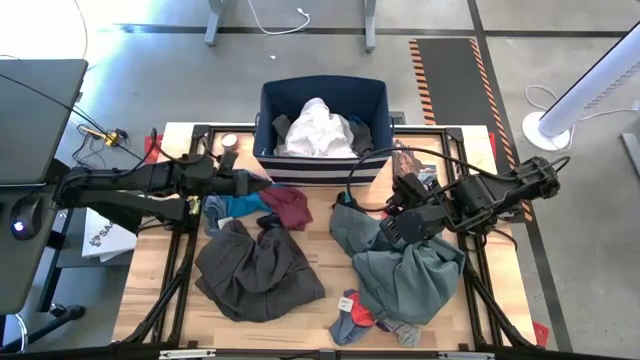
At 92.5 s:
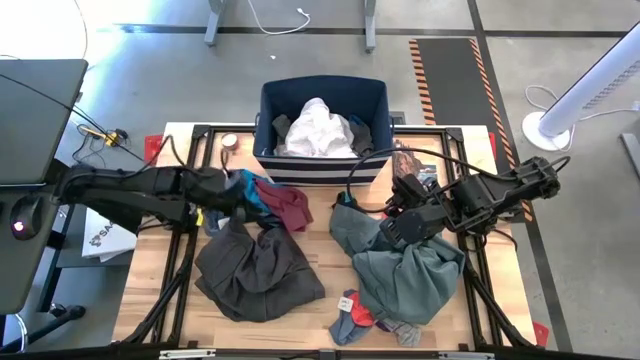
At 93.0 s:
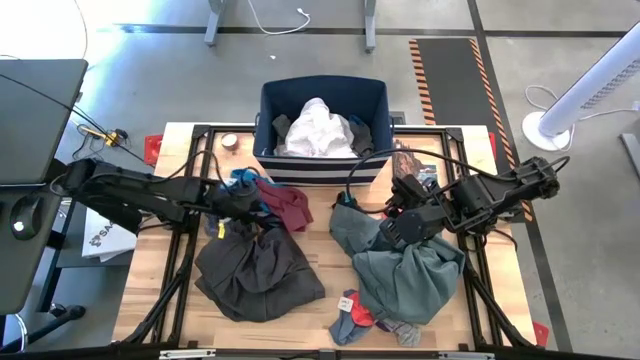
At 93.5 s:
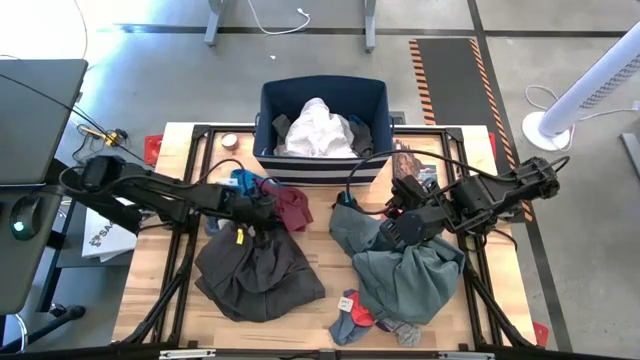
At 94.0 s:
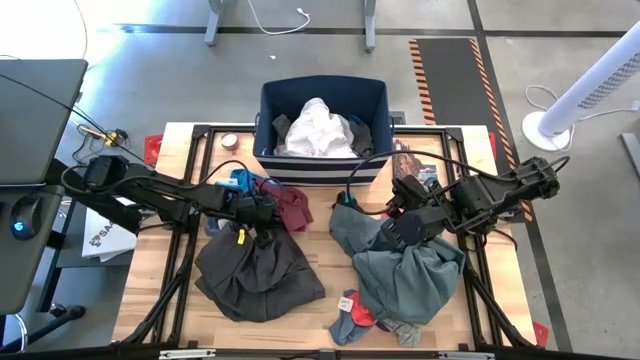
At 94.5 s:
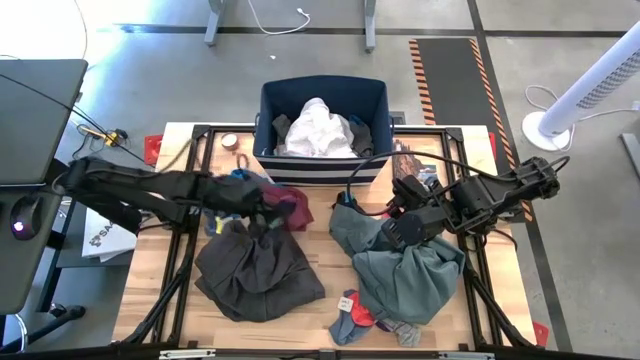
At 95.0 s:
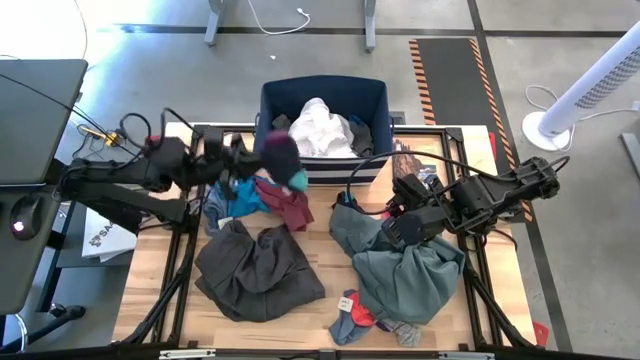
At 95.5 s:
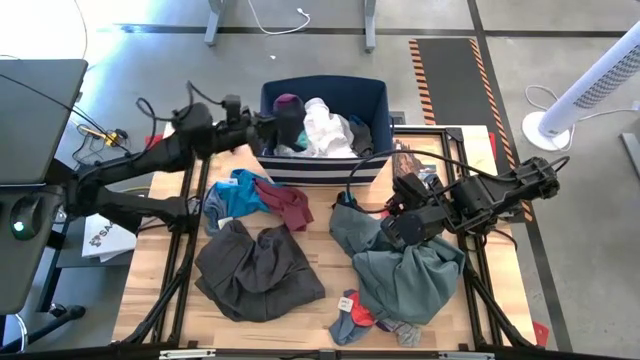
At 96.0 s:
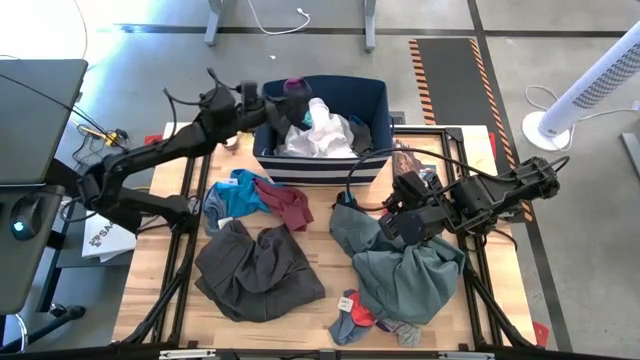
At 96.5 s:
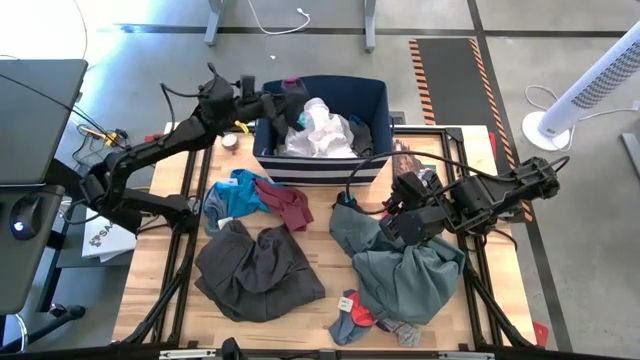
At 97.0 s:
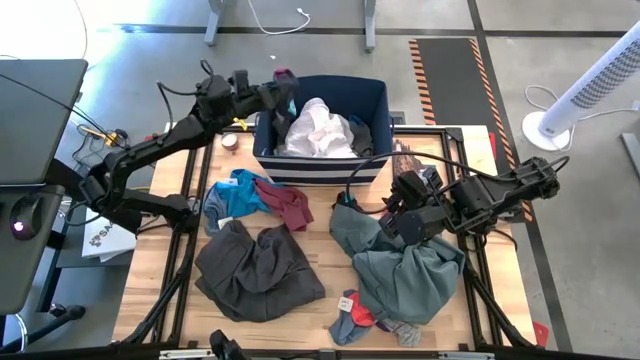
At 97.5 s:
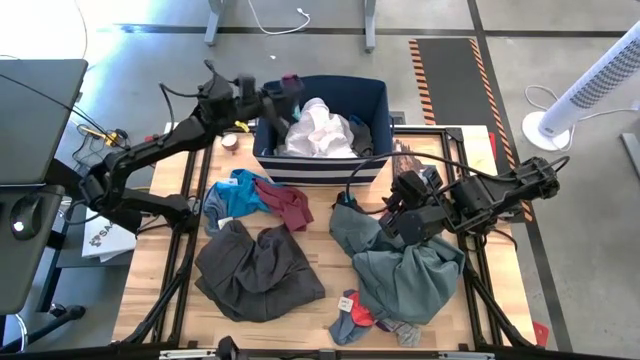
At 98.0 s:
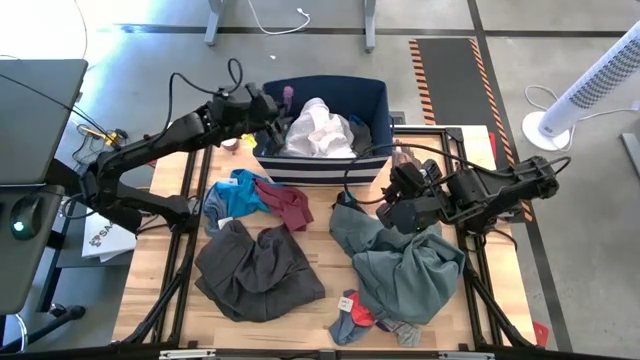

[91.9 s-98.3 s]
Task: Sort clothes
Put the black sock into the blue laundry bin

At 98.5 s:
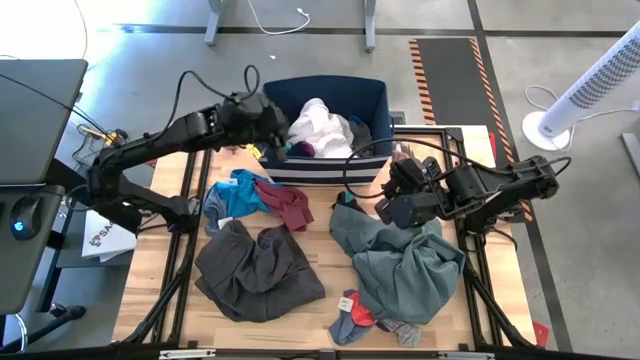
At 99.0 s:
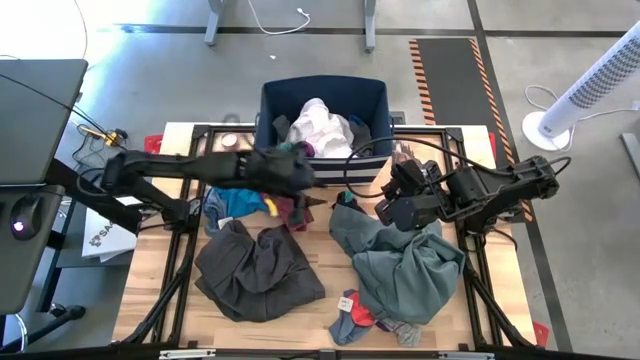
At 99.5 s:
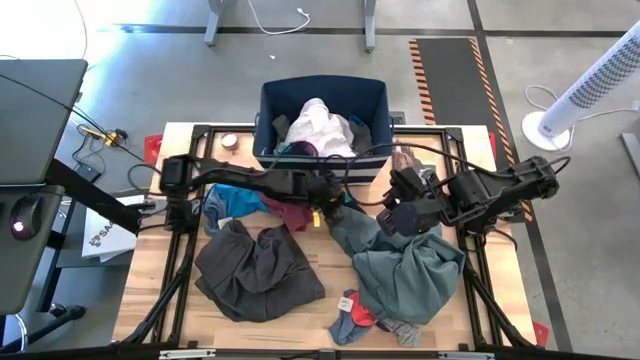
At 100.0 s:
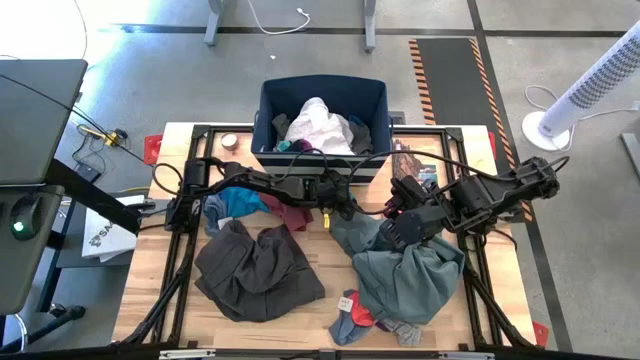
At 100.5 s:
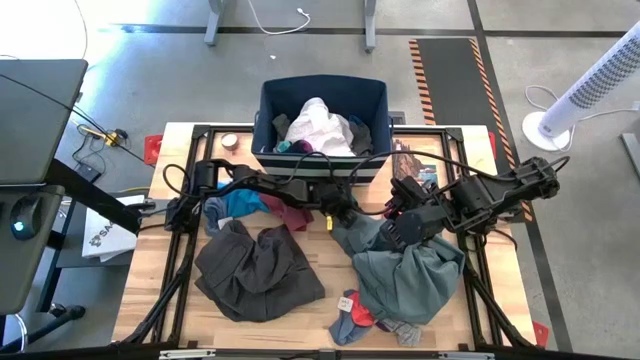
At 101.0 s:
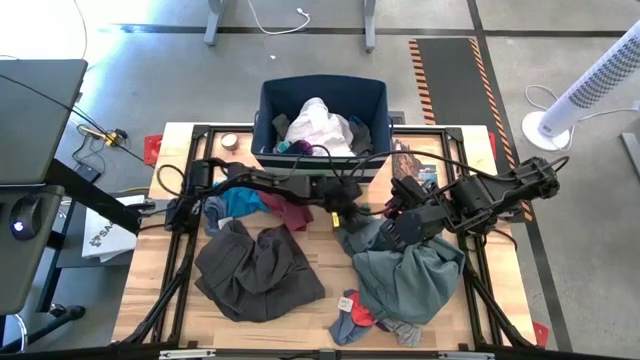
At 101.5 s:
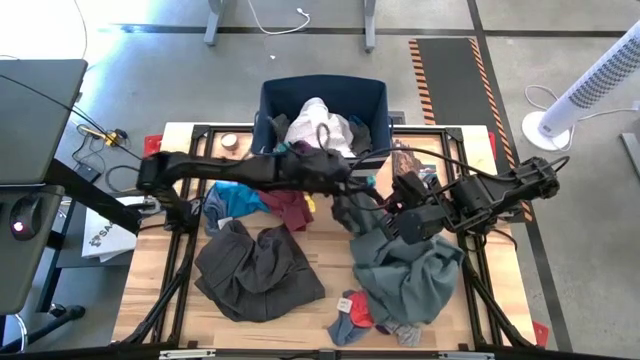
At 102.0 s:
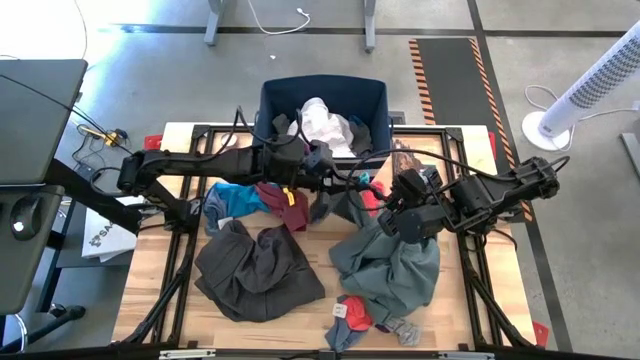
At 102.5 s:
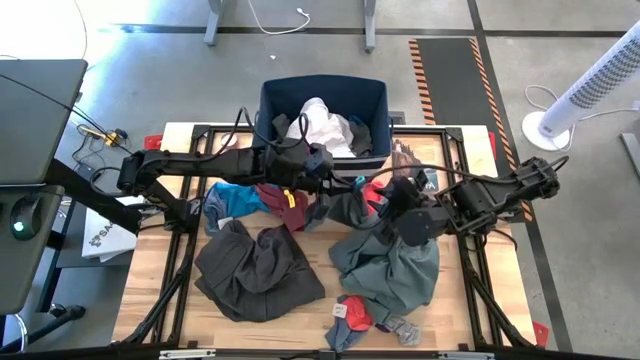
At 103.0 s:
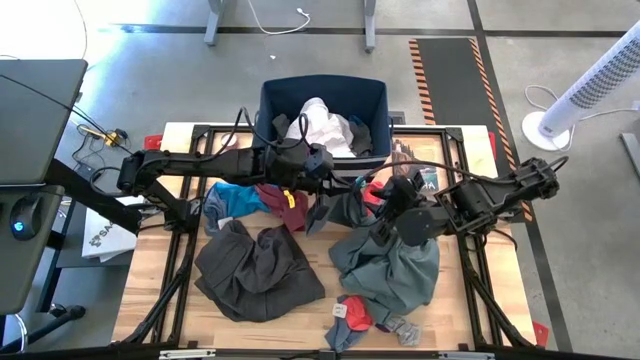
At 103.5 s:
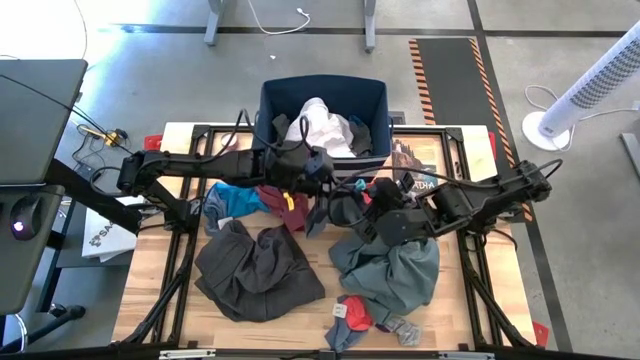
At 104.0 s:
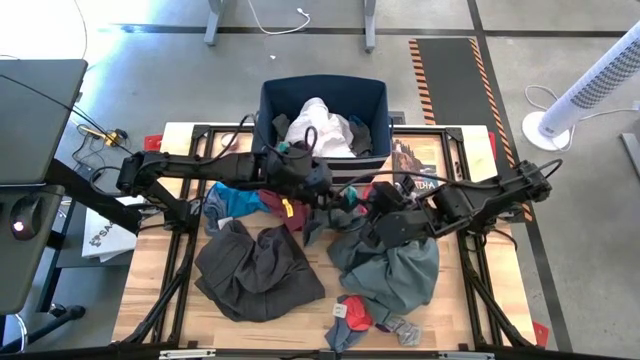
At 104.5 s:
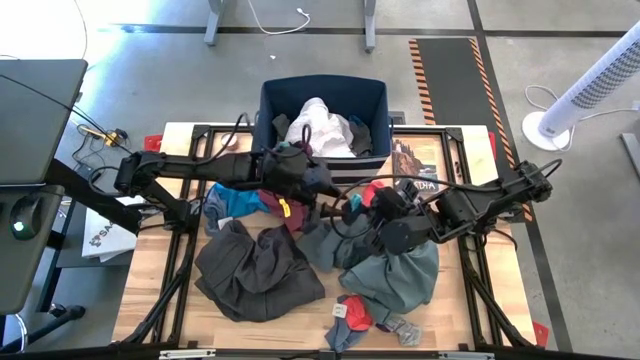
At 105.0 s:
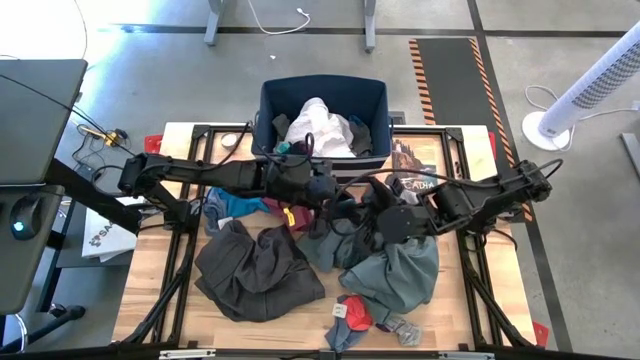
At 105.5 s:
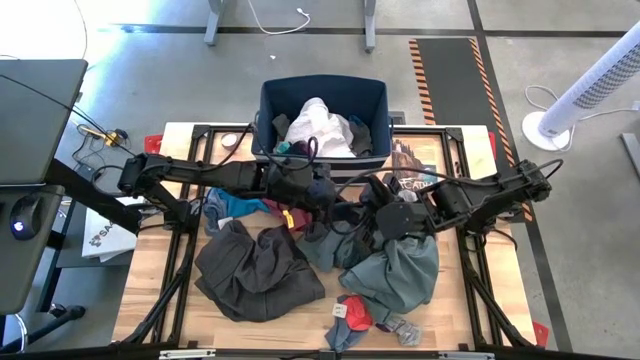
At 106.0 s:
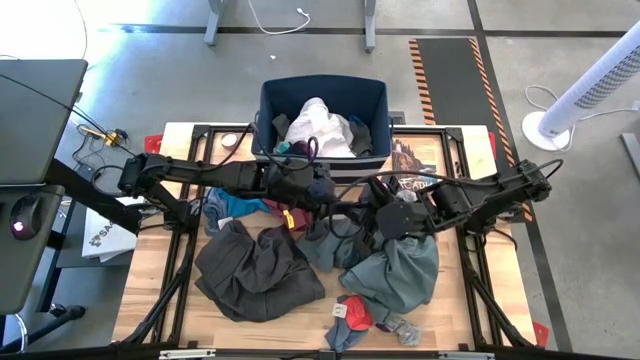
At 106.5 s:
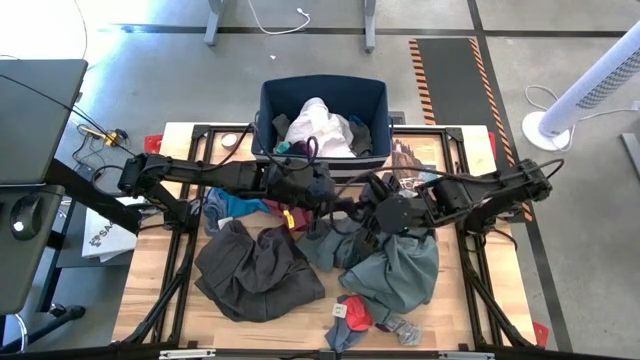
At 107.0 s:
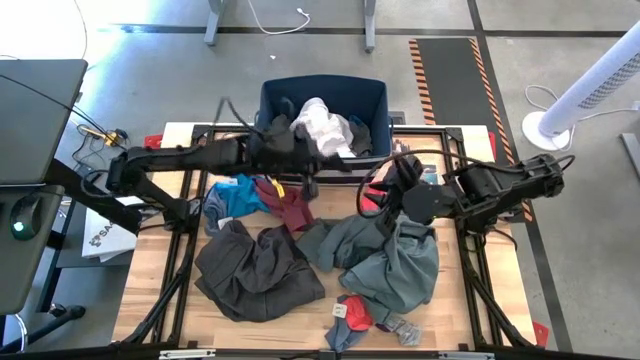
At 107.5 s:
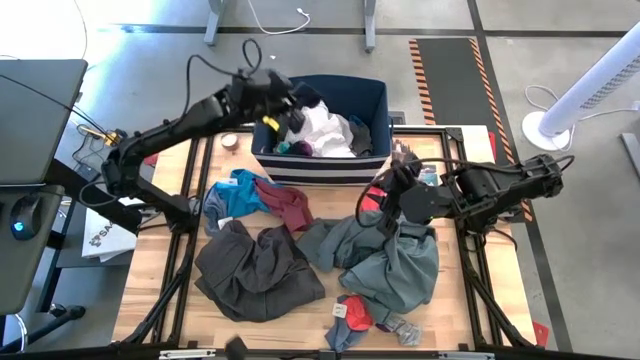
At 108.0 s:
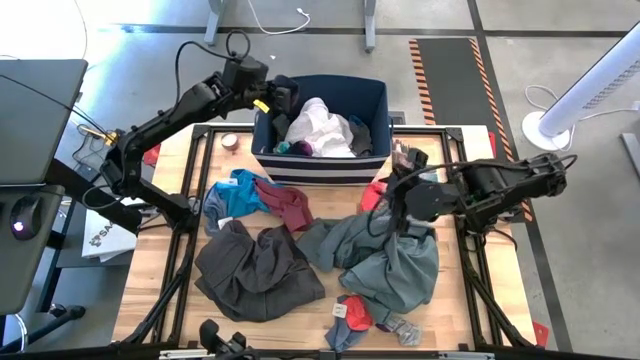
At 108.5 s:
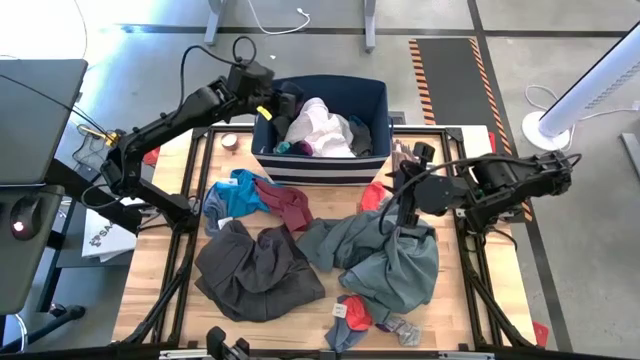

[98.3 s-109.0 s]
Put the black sock into the blue laundry bin

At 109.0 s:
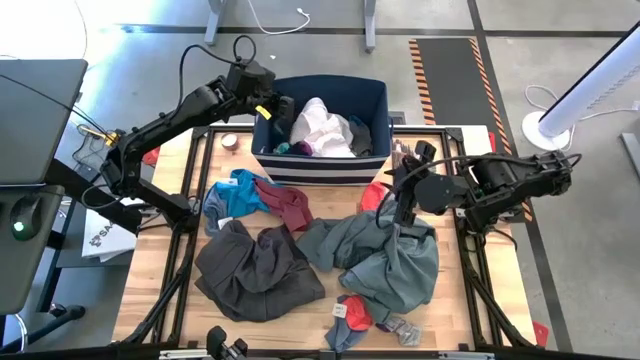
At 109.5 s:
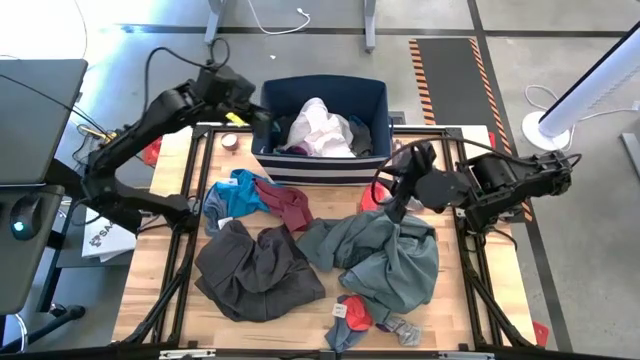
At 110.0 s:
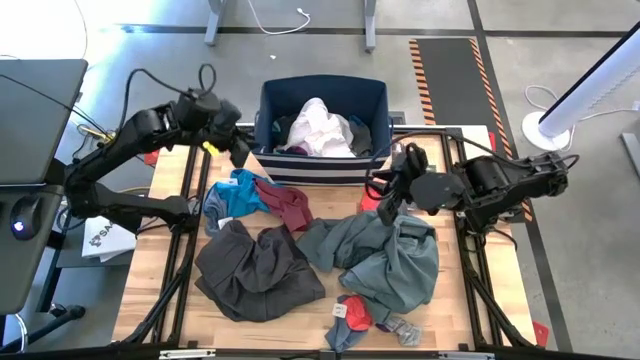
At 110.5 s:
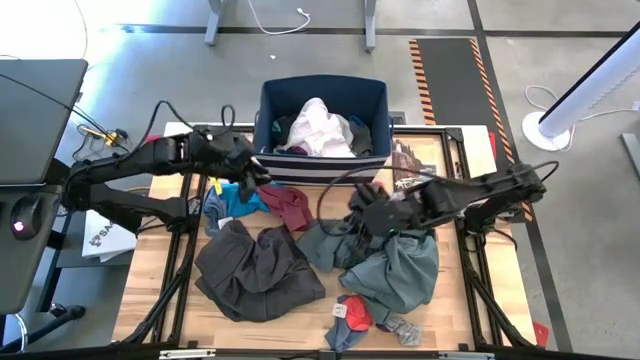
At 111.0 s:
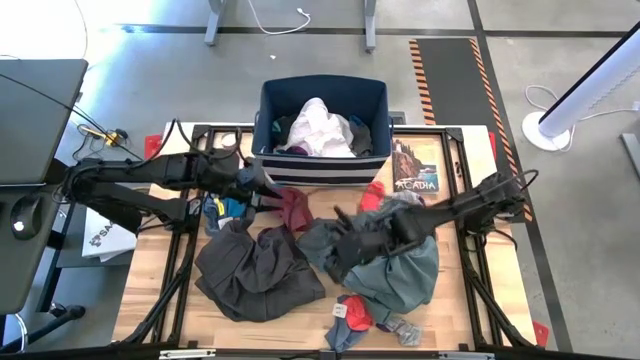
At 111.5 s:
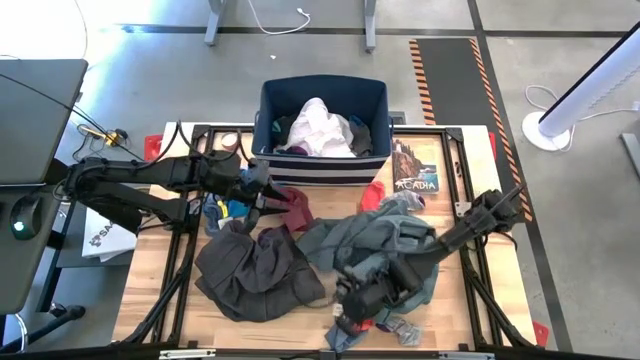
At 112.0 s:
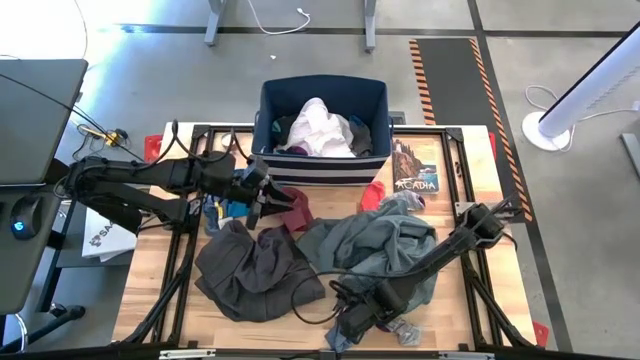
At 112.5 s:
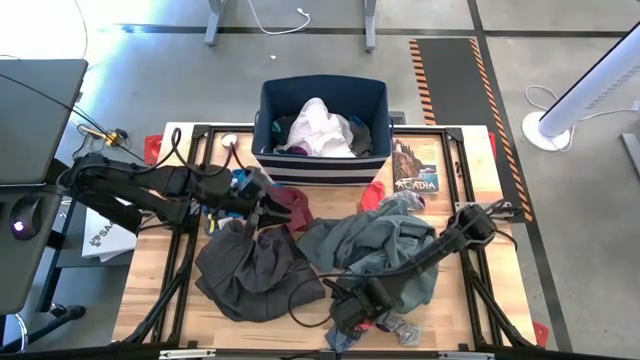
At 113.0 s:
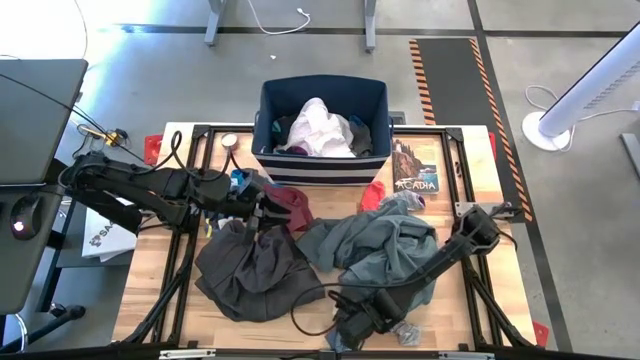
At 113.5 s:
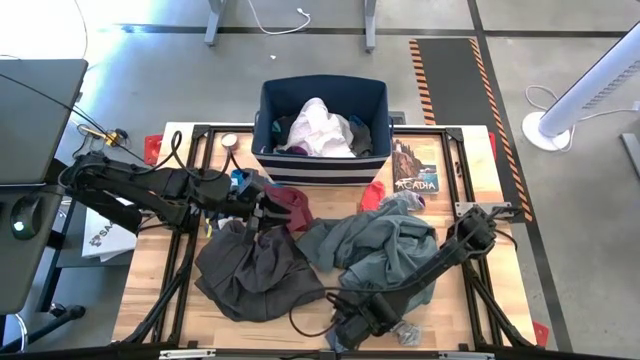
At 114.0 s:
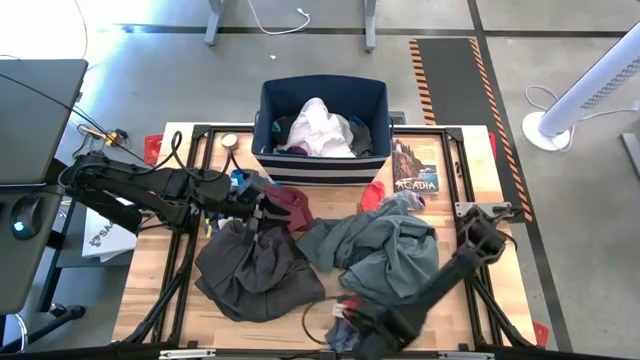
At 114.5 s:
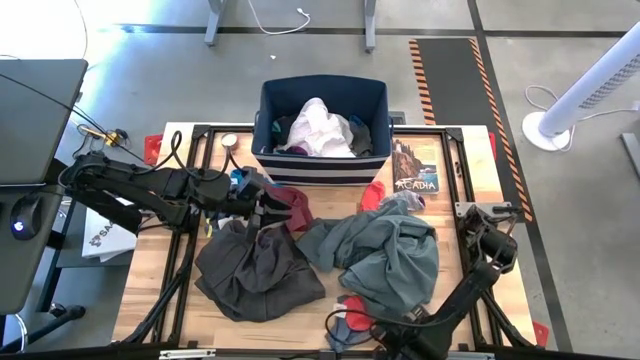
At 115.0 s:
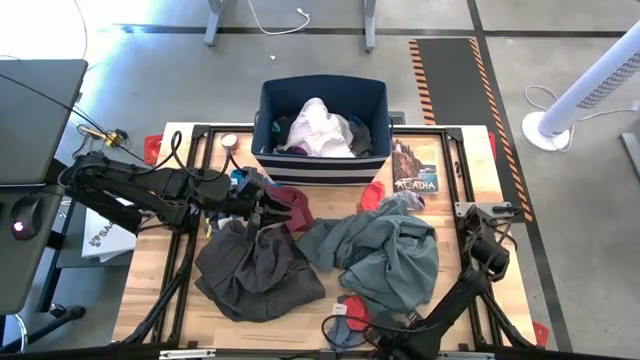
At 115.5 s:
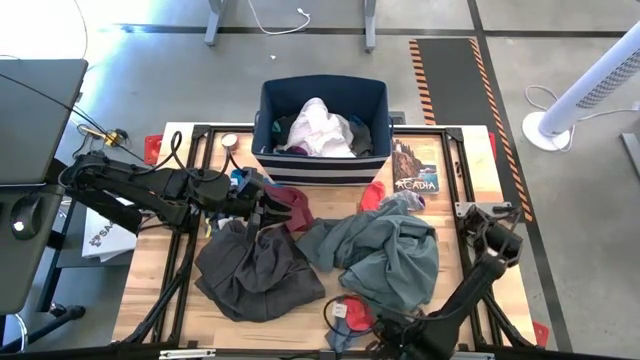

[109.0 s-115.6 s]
Put the grey sock into the blue laundry bin
